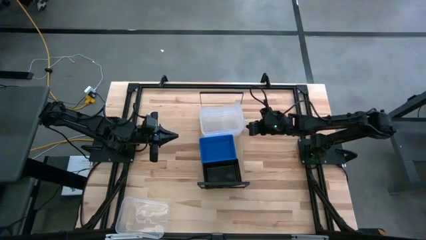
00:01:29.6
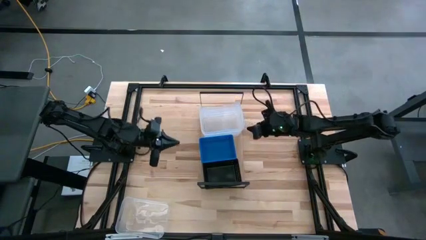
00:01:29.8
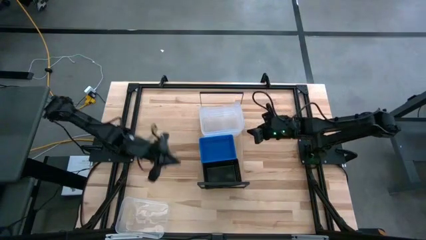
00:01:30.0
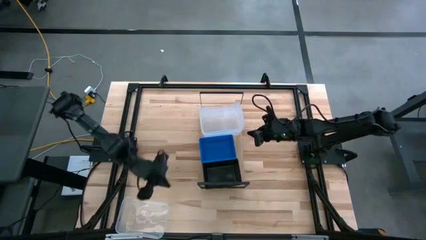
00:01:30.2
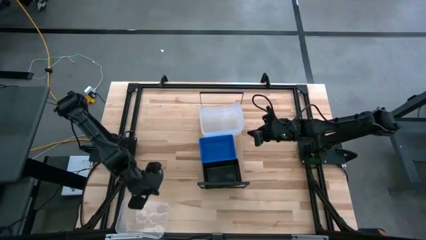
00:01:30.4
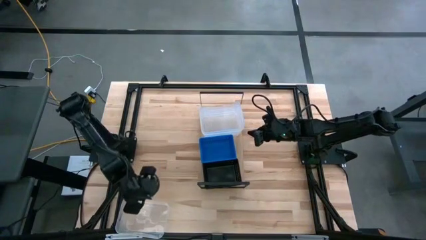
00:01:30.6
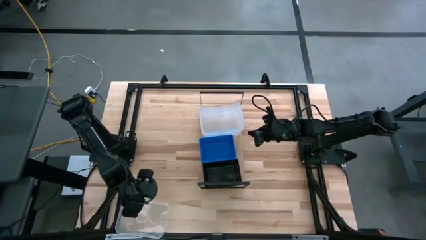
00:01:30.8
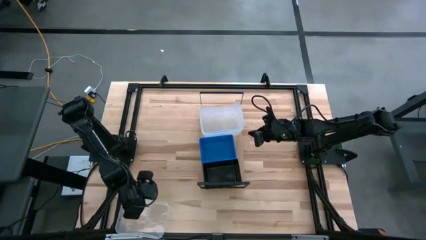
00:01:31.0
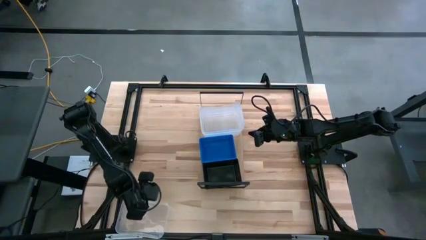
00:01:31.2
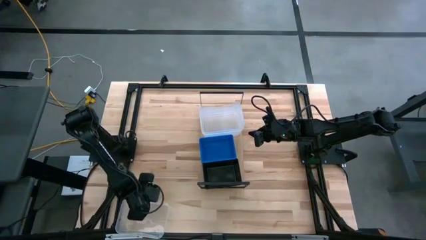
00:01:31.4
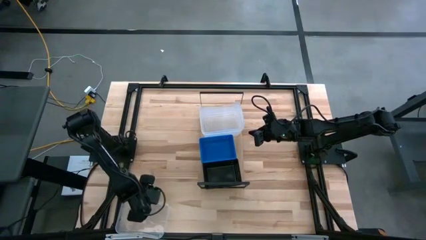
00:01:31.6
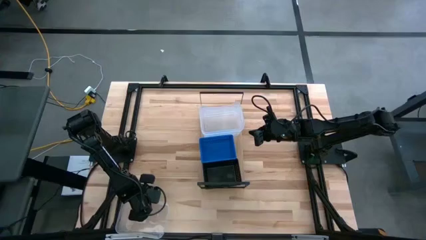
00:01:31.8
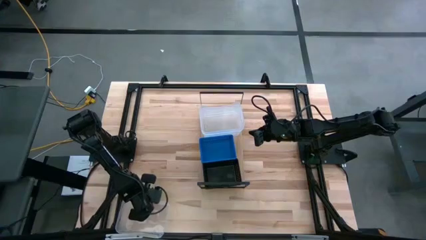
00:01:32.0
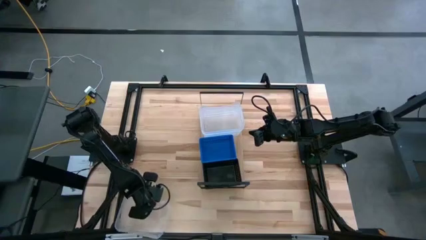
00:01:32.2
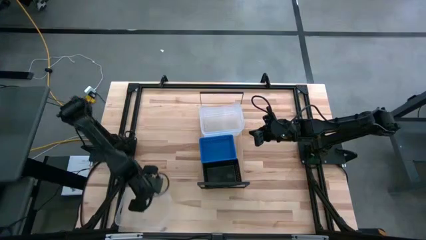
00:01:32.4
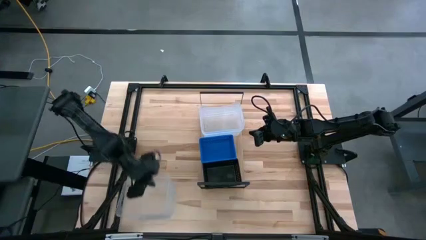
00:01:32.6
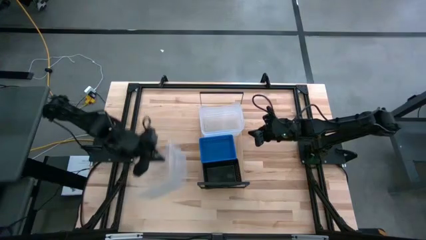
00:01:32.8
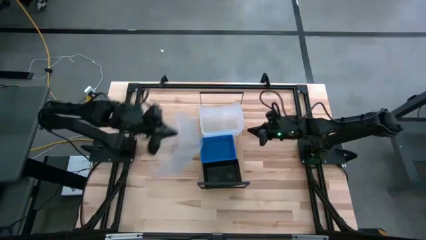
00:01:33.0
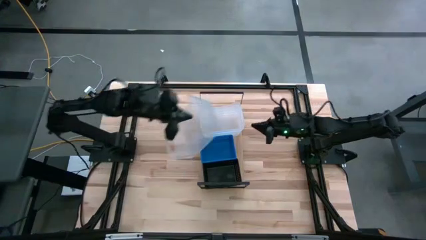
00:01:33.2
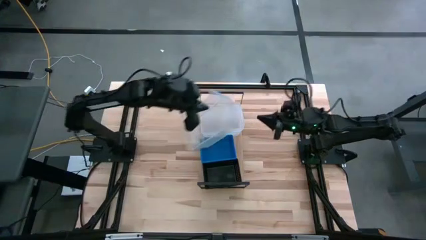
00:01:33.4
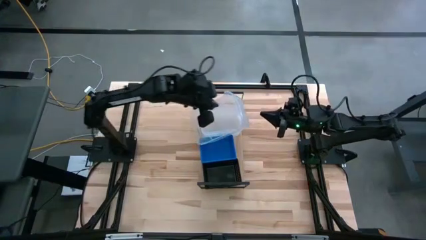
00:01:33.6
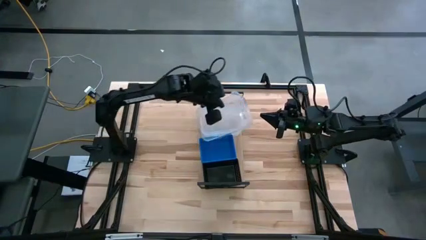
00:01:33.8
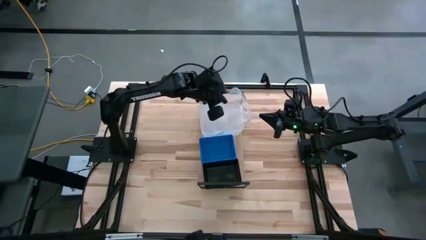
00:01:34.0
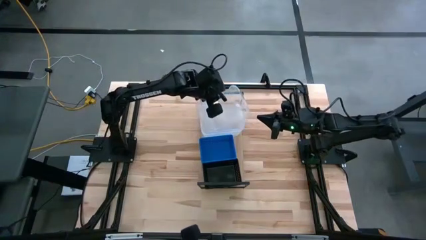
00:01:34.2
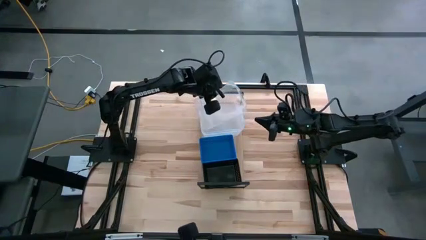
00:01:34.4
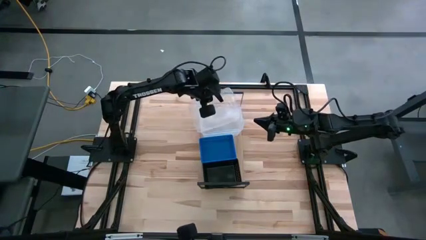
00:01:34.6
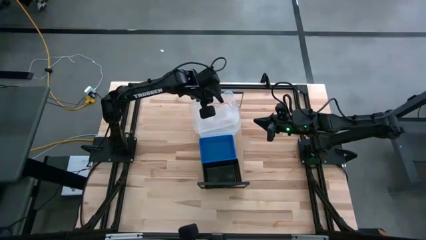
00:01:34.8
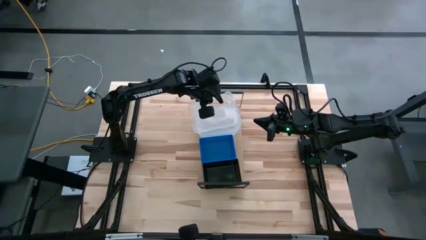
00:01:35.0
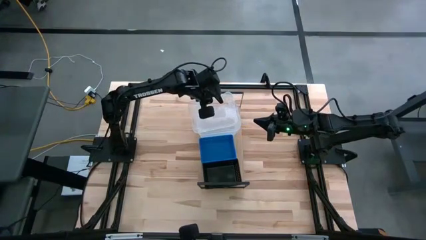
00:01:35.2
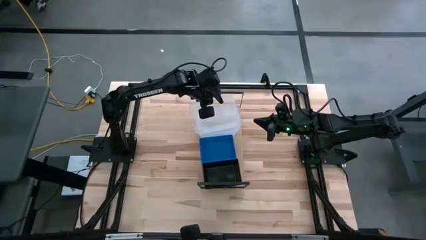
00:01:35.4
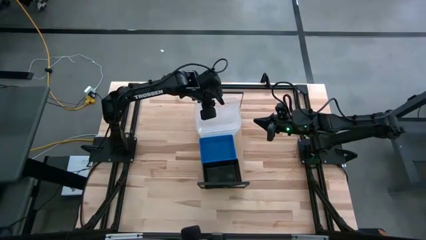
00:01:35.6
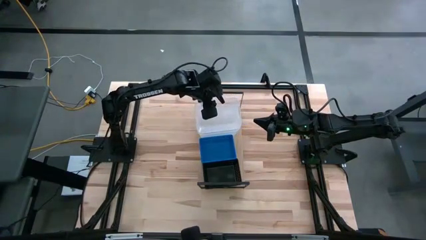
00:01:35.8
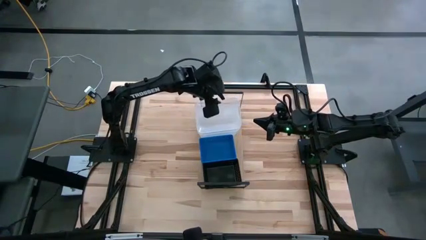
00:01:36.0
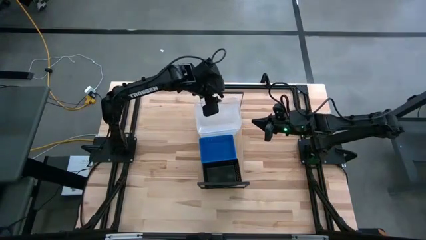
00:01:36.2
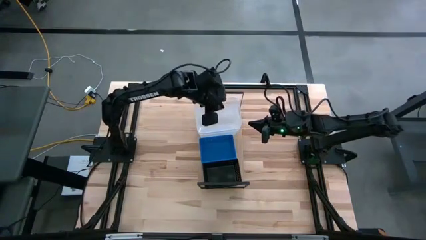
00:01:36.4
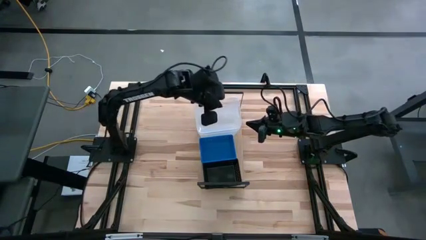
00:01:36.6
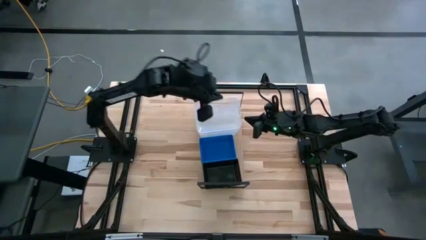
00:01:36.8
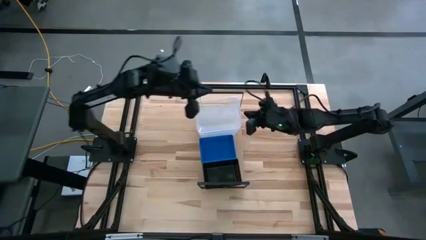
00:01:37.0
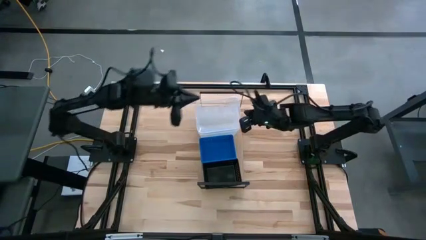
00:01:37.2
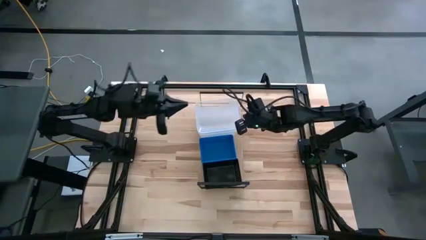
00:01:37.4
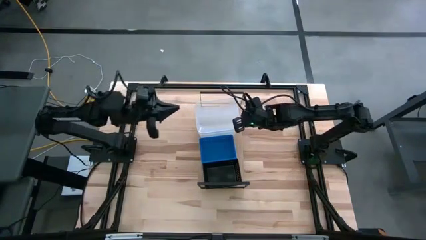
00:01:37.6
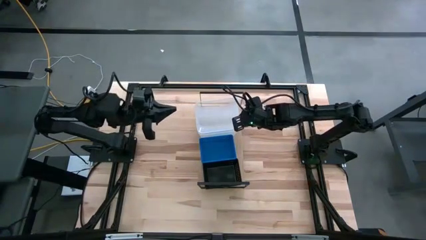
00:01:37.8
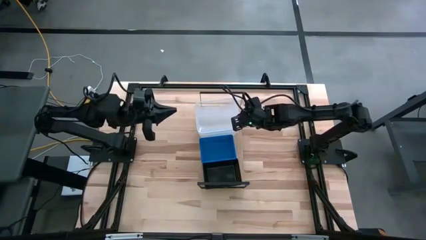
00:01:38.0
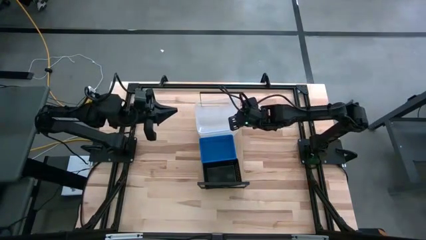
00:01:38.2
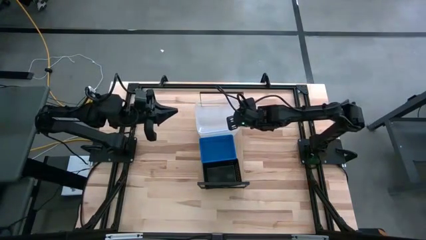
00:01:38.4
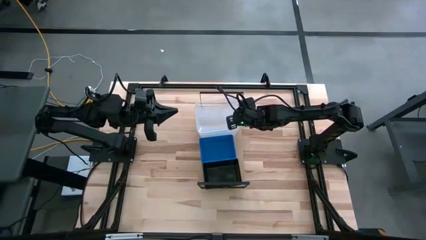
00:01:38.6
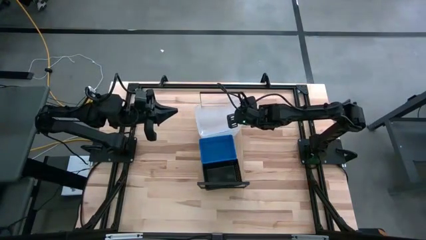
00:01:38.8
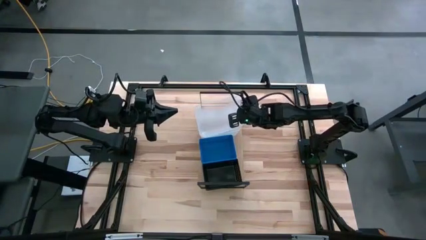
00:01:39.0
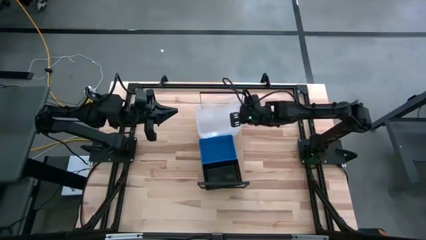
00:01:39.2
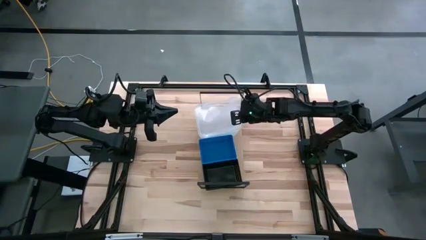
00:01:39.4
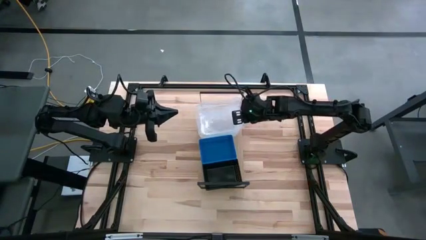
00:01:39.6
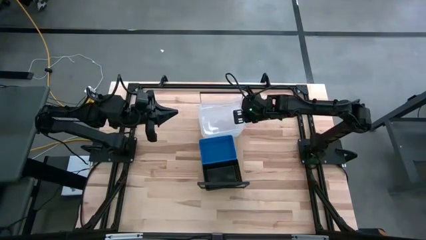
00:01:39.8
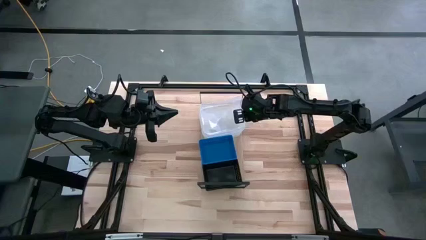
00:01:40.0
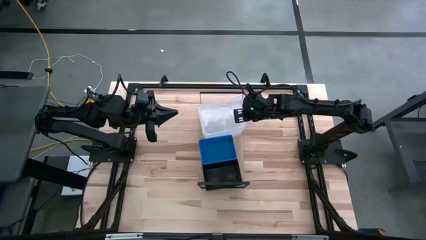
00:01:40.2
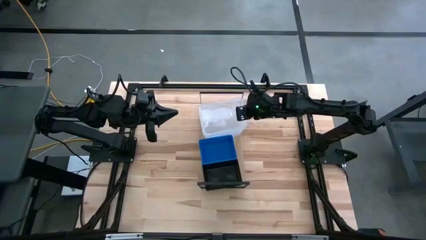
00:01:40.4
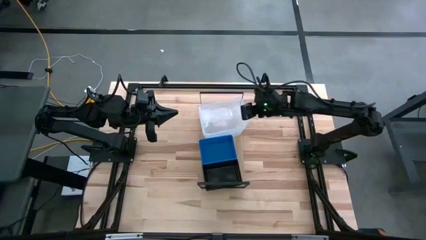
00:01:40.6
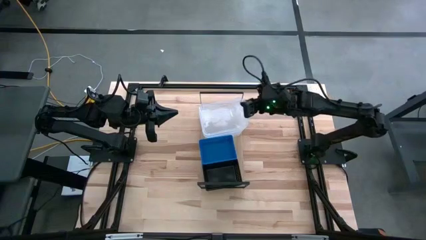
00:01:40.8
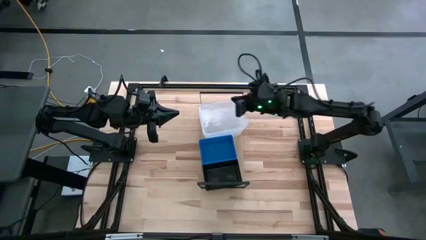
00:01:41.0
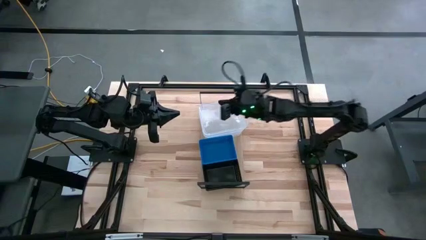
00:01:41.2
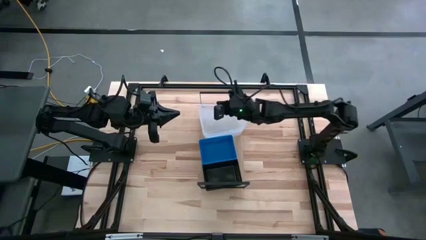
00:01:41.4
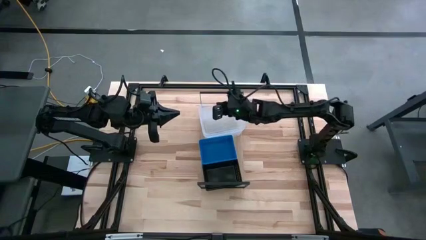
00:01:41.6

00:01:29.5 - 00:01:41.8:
Task: Stack baskets on shelf by color
Stack the transparent bin on top of the other transparent bin on the shelf

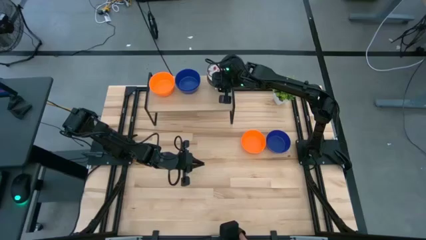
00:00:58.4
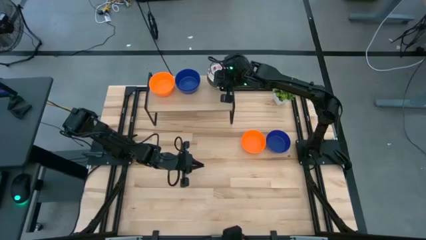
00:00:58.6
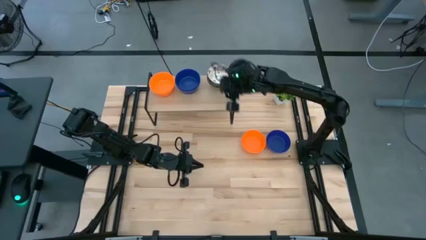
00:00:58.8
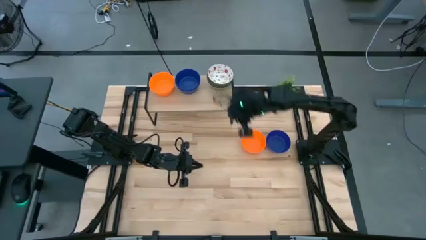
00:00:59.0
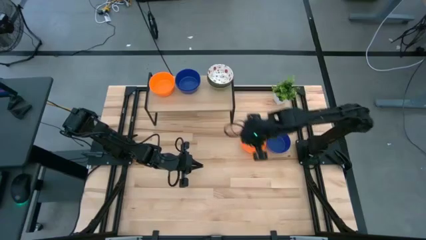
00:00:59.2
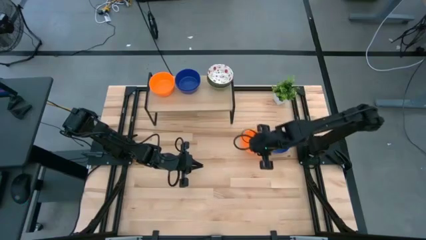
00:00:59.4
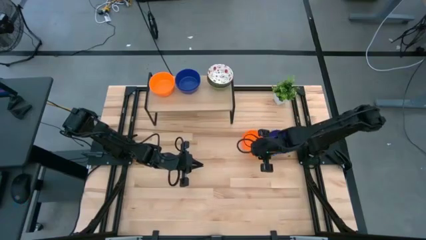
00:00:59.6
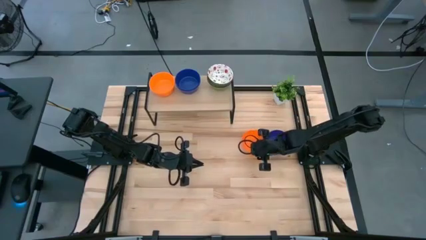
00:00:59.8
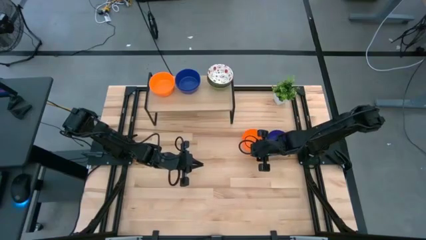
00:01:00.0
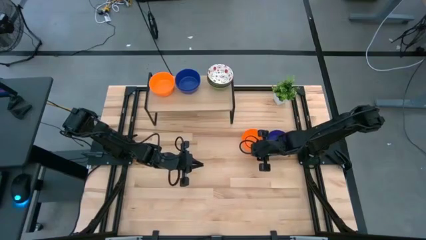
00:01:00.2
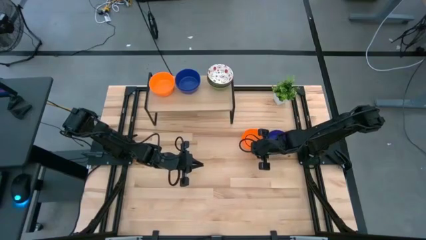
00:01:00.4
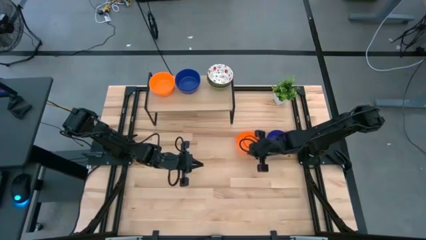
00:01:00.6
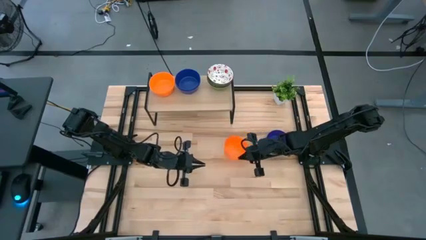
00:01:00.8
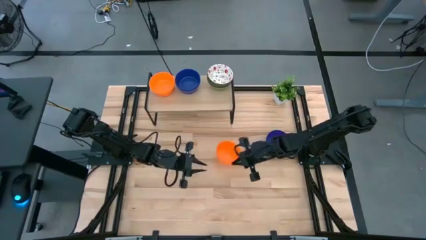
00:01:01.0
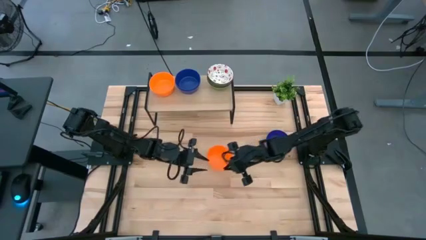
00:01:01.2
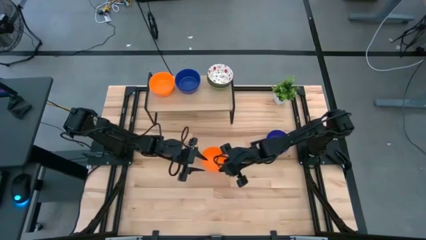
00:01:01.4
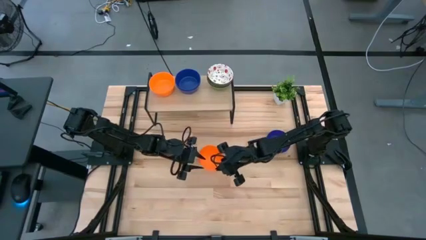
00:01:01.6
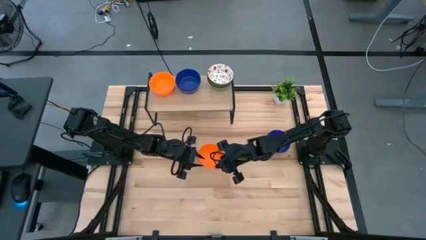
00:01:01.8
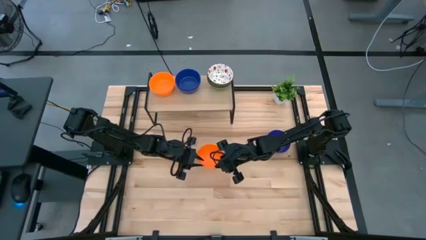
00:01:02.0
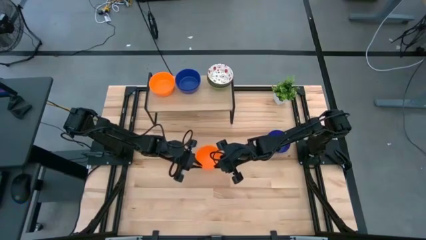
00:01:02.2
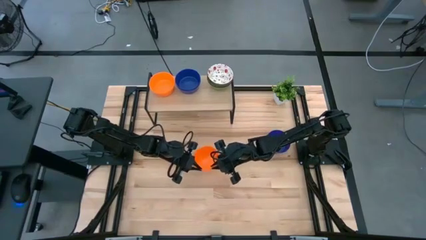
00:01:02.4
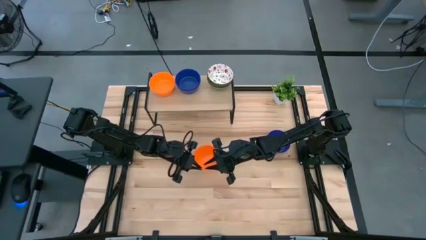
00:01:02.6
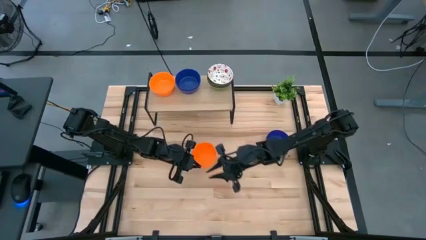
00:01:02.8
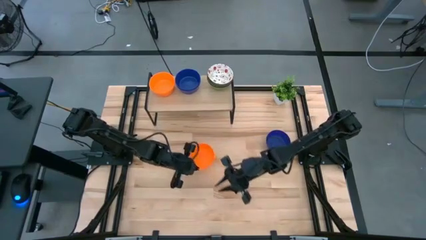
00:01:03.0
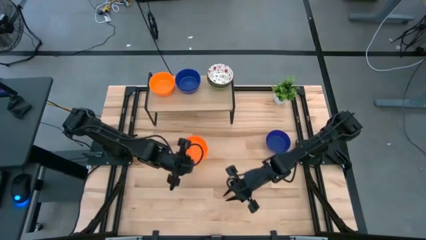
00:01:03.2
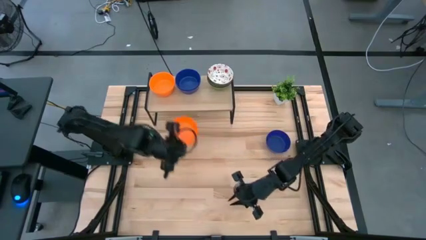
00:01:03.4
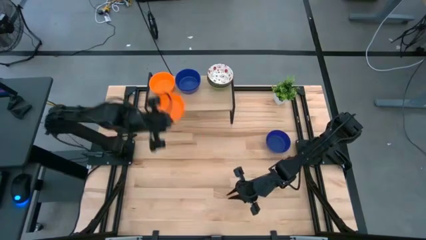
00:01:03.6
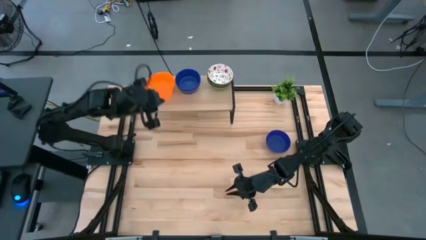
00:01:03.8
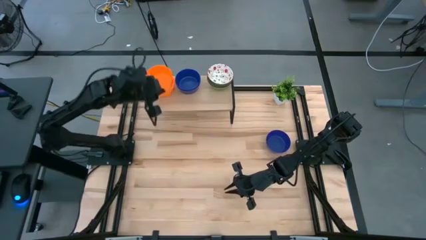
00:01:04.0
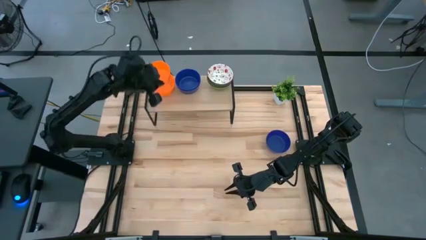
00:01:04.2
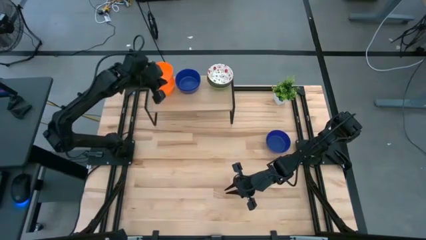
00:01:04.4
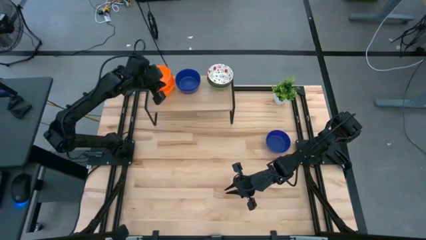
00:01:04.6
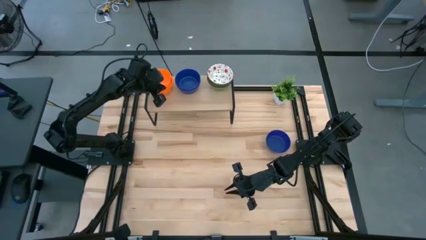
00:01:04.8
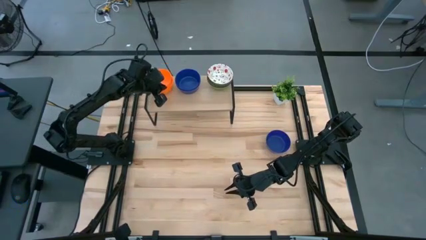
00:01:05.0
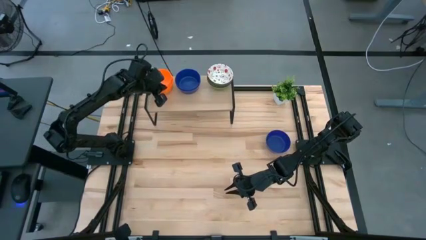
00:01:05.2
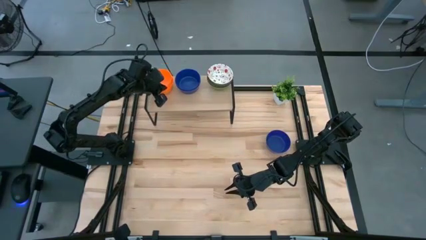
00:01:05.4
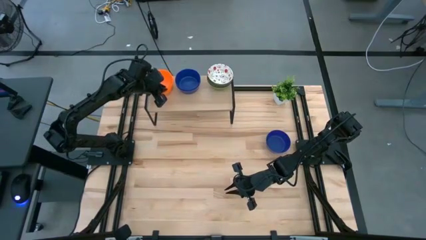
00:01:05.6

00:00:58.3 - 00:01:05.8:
Task: Pick & Place Mini bowls
Stack the orange bowl on top of the other orange bowls on the shelf
